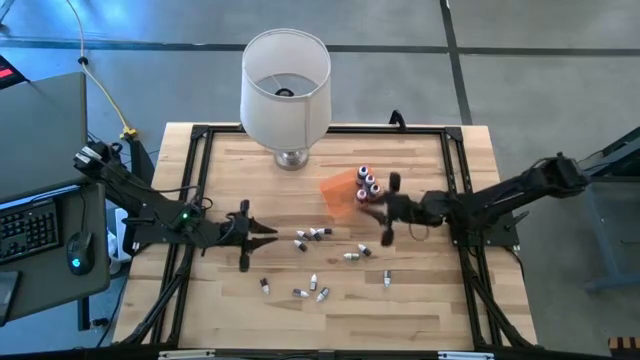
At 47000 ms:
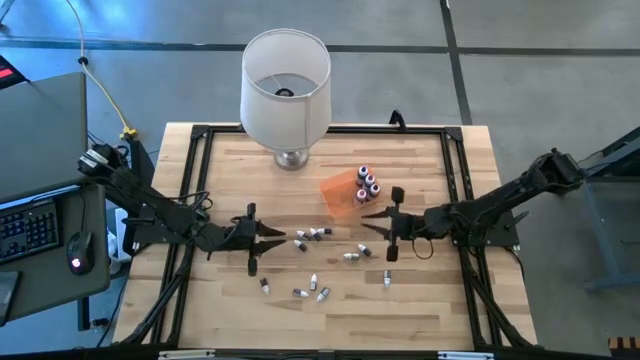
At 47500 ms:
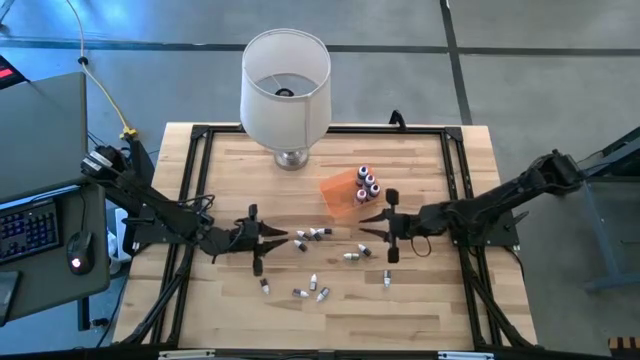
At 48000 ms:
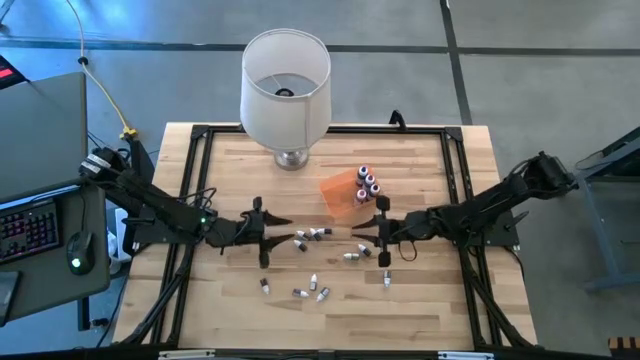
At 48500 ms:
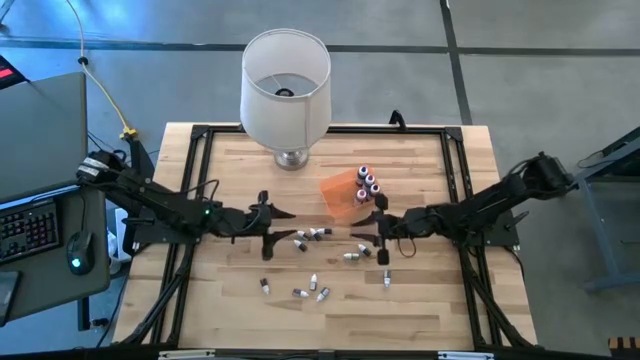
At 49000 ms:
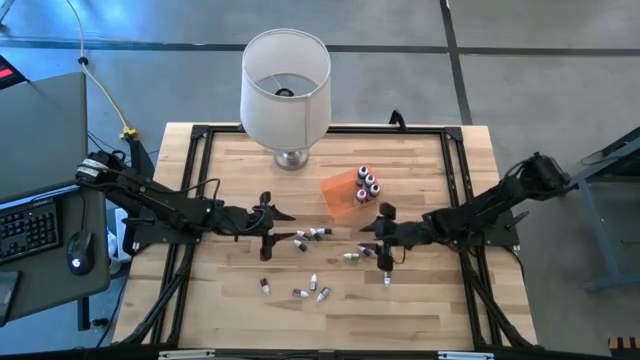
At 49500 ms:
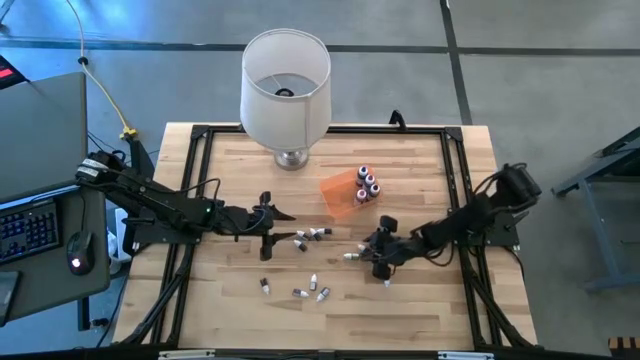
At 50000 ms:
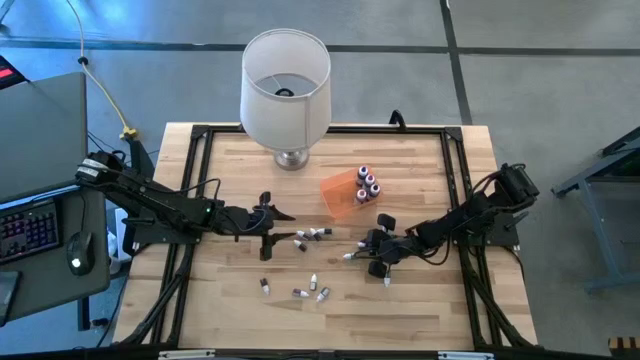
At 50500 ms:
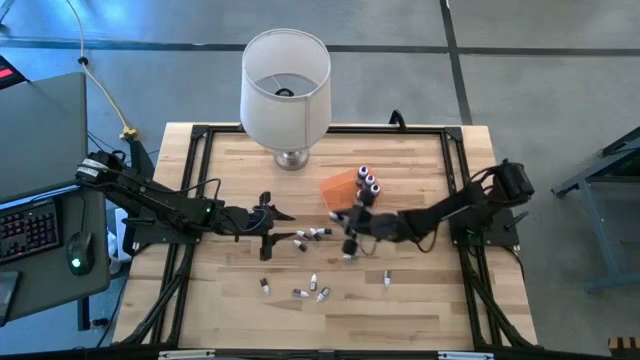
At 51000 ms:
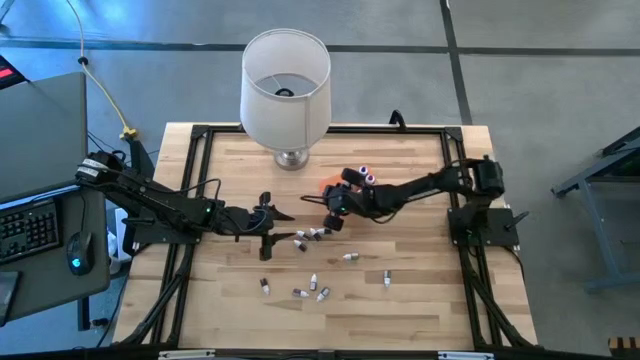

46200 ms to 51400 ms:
Task: Pick & Place food coloring
Put the bottom small black food coloring bottle into the orange bin

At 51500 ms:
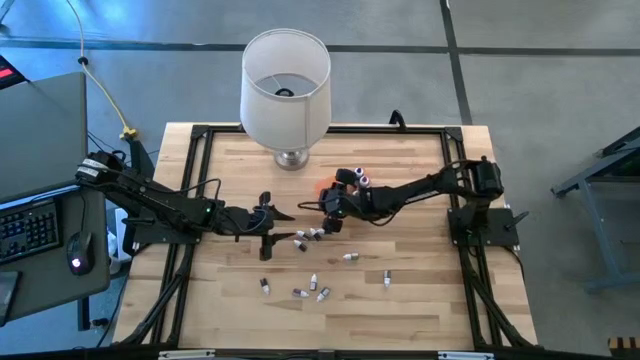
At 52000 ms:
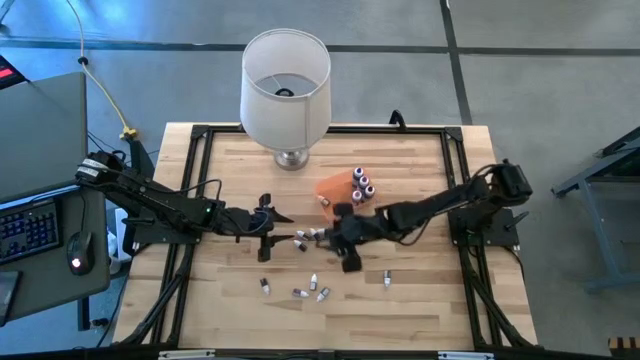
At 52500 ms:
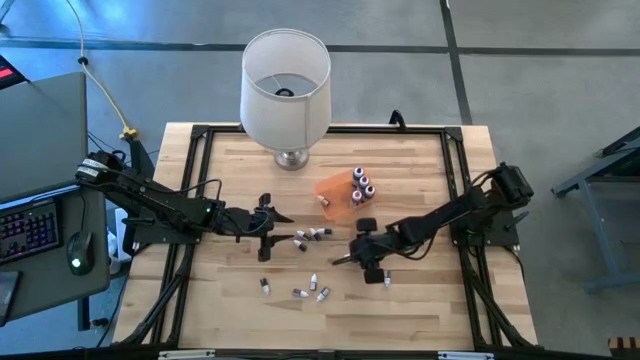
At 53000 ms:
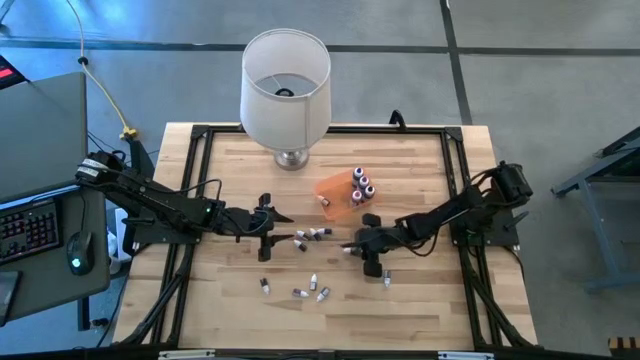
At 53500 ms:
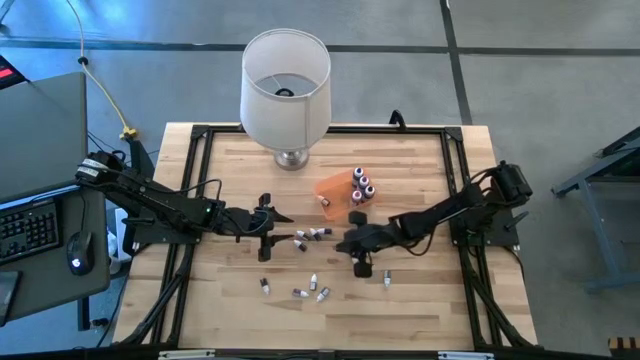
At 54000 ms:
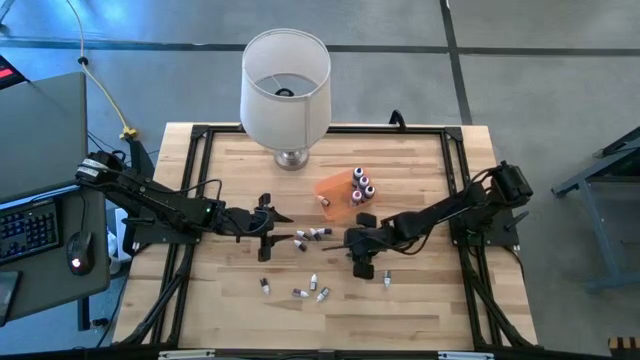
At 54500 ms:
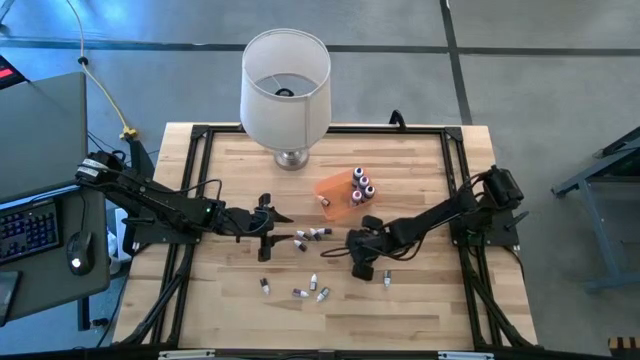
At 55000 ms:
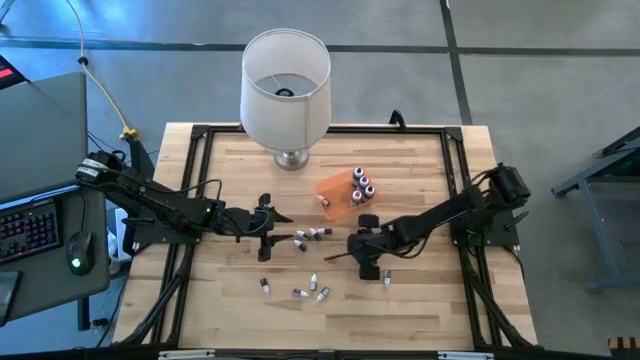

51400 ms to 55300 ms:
Put the bottom small green food coloring bottle into the orange bin

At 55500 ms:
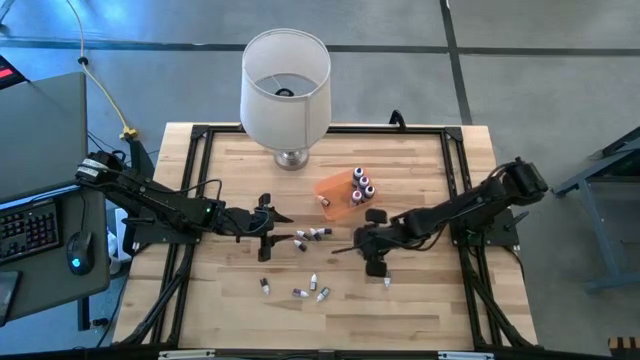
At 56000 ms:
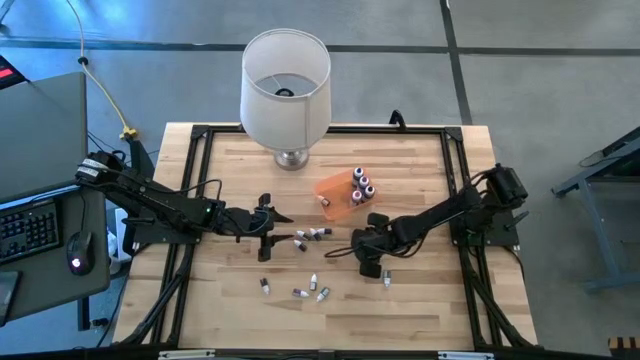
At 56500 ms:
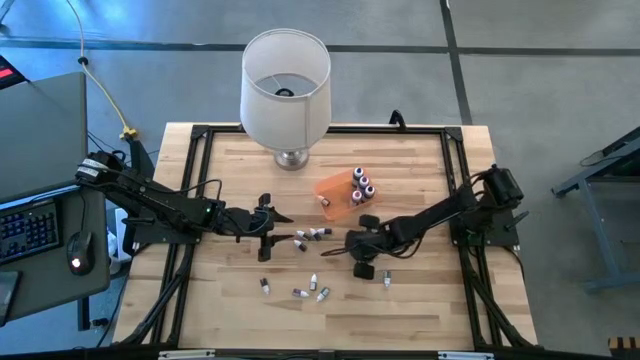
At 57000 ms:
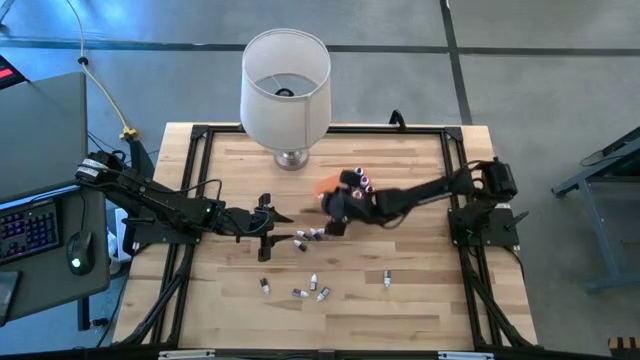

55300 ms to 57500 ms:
Put the bottom small green food coloring bottle into the orange bin

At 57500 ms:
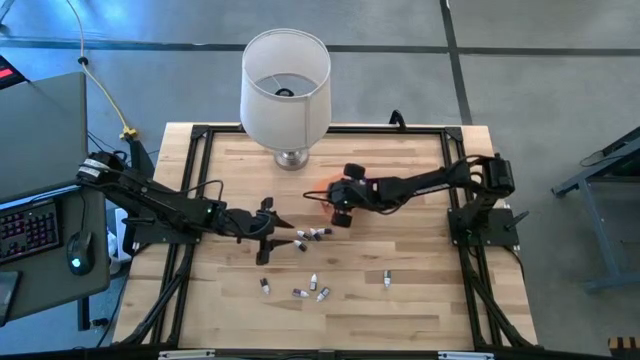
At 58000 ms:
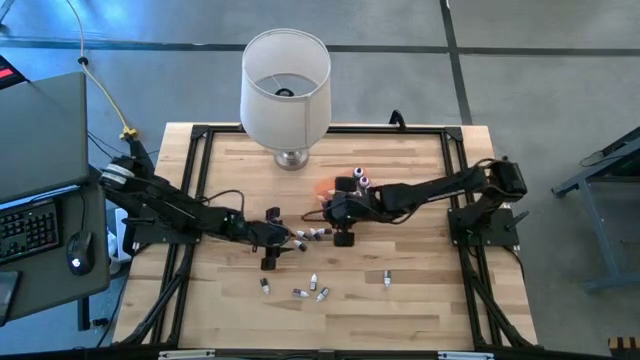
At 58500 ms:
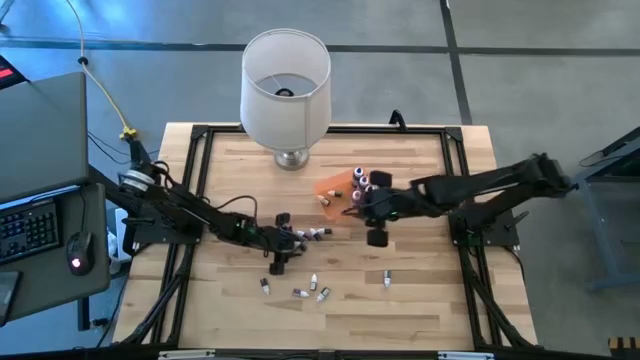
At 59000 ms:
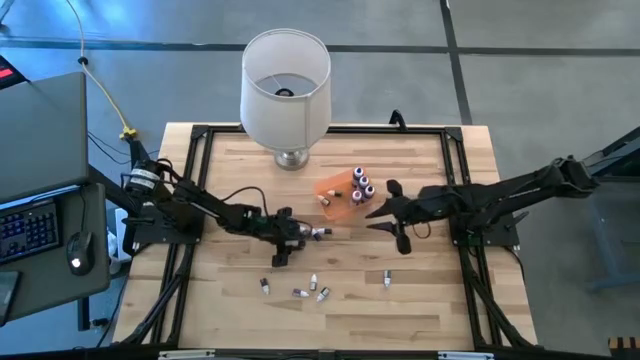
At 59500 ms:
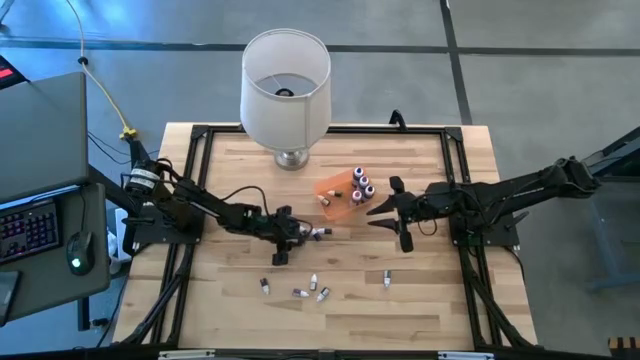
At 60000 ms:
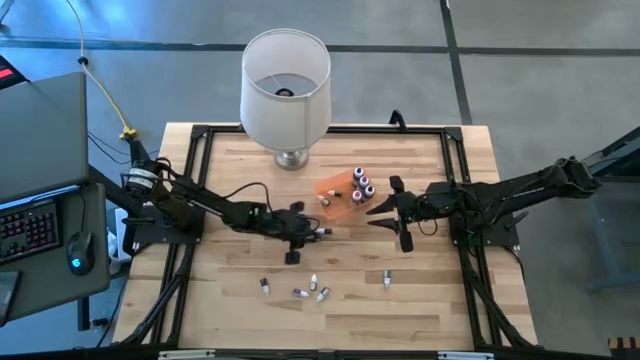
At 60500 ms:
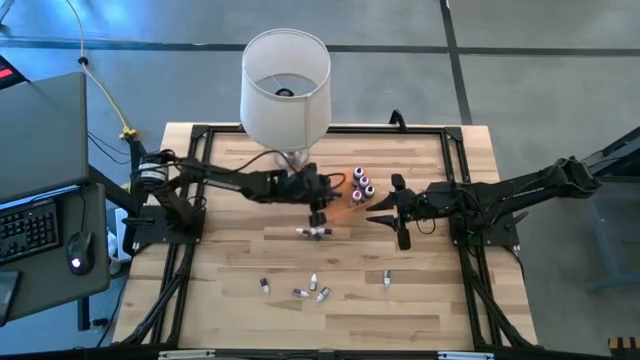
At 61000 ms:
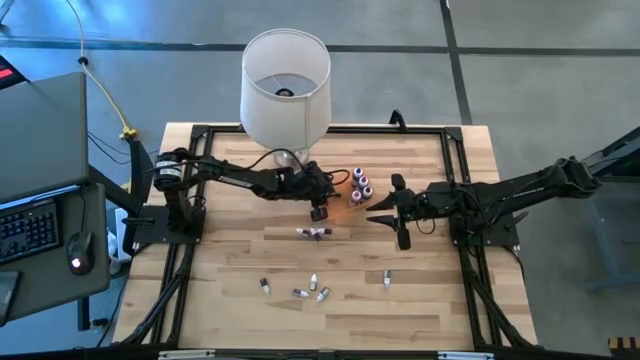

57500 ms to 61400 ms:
Put the bottom small red food coloring bottle into the orange bin

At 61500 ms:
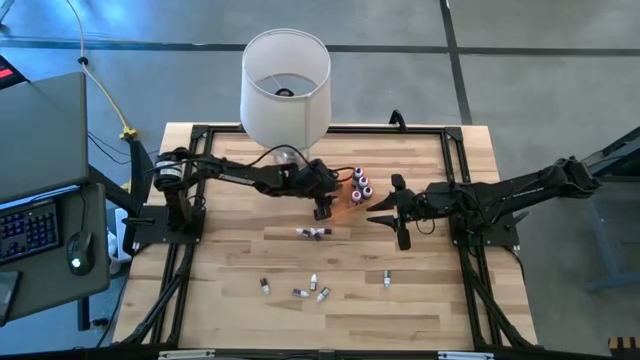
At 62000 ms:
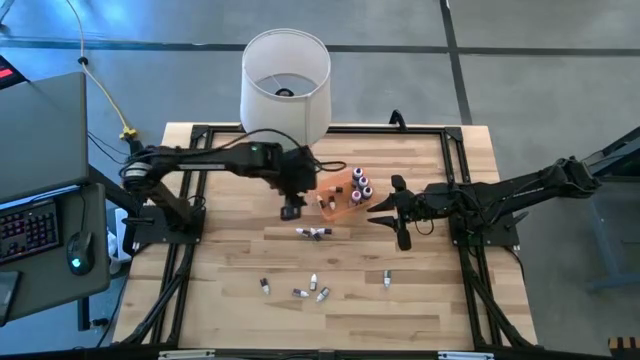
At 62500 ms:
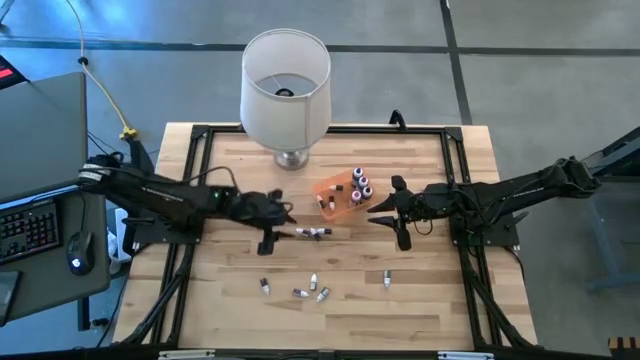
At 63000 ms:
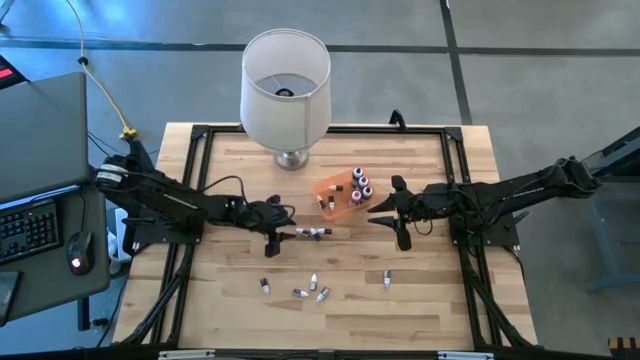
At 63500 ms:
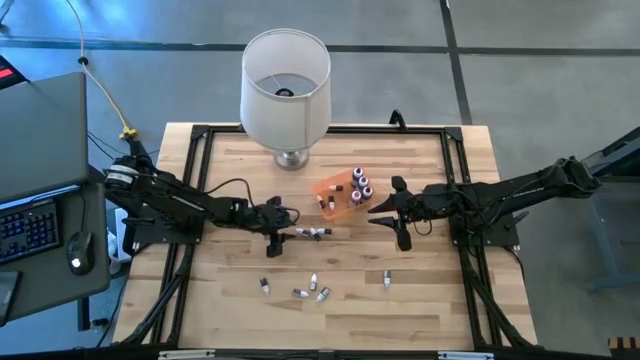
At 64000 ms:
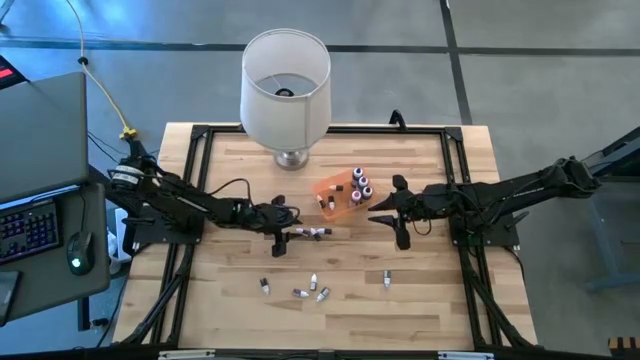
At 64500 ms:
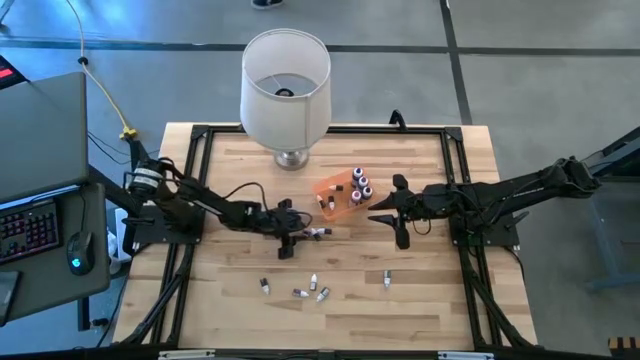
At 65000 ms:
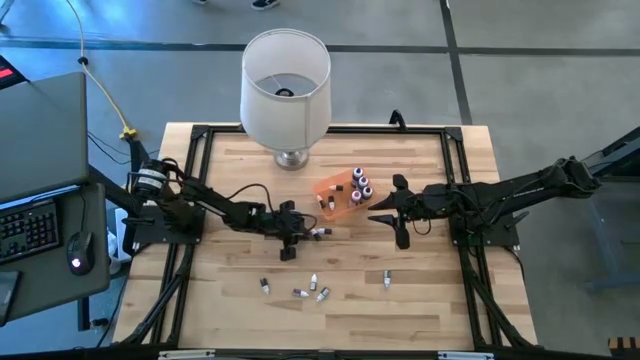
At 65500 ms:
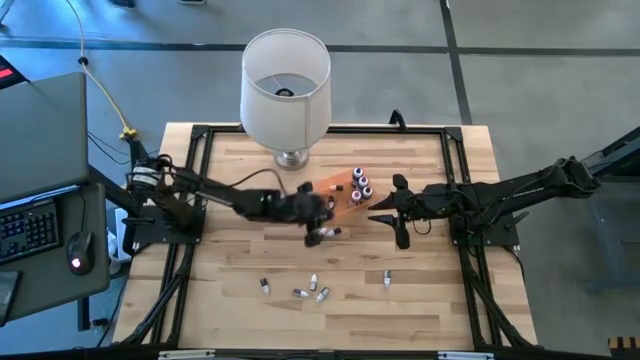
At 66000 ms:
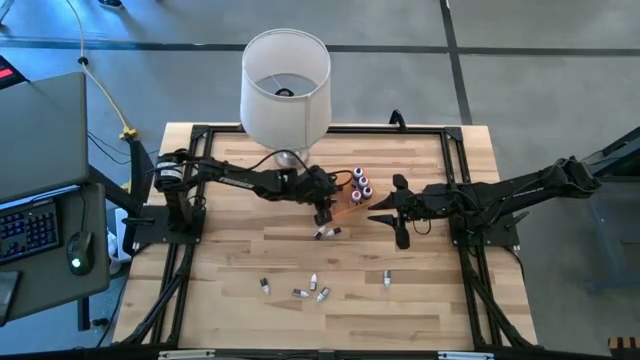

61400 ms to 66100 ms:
Put the small red food coloring bottle into the orange bin

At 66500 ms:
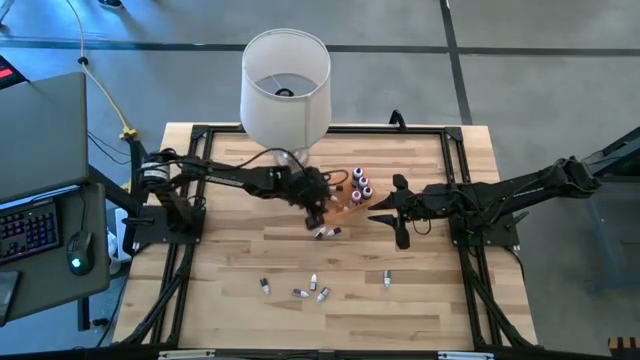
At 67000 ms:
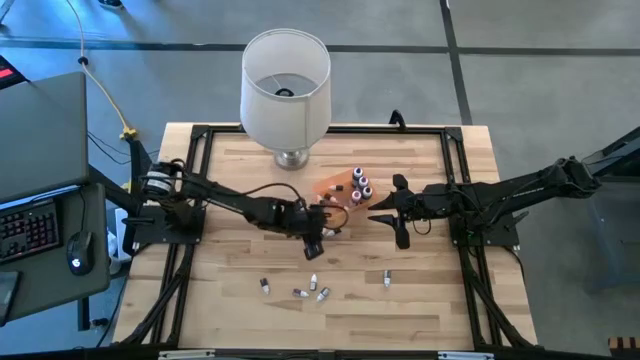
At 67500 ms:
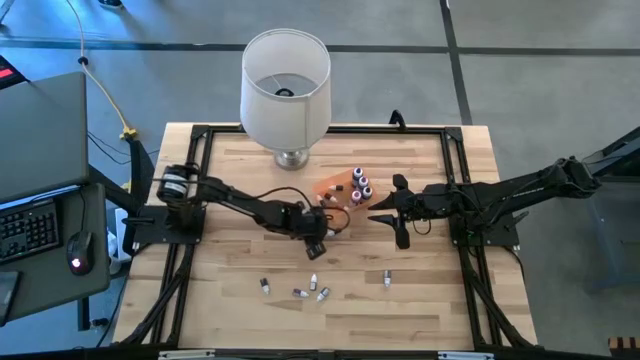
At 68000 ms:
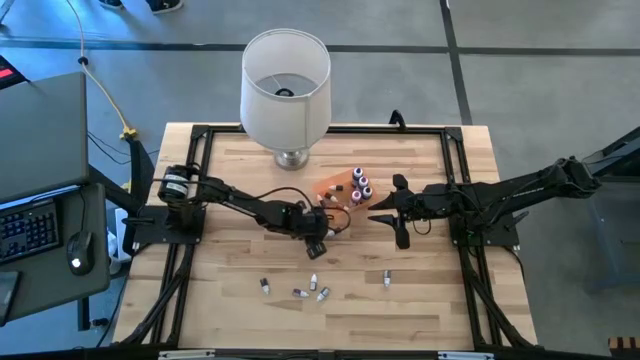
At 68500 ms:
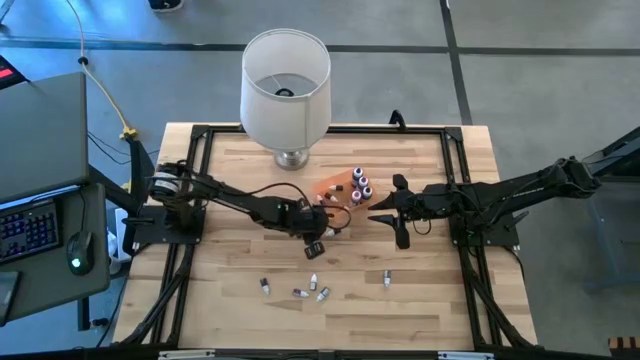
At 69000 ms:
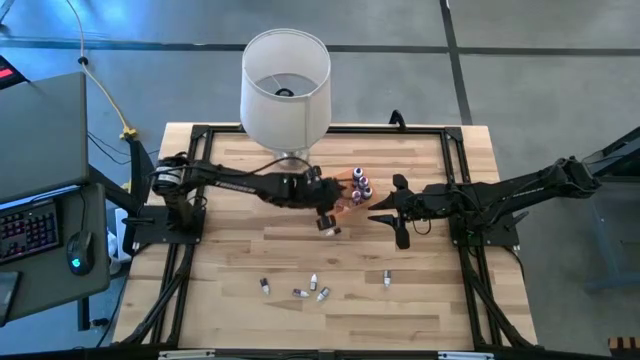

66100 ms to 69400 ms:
Put the small green food coloring bottle into the orange bin
